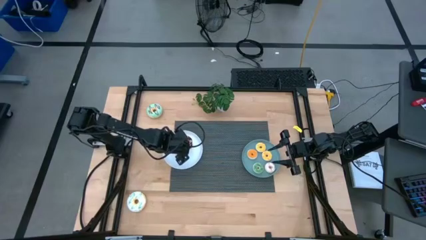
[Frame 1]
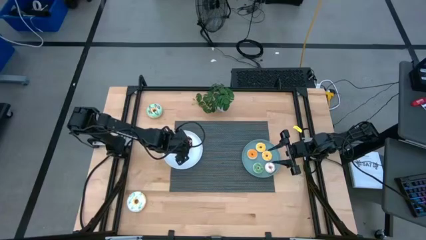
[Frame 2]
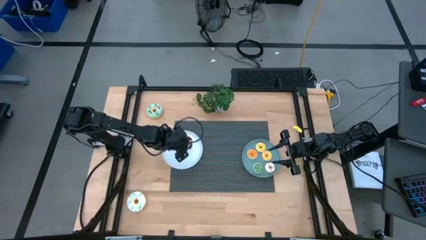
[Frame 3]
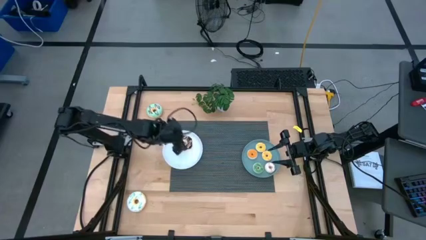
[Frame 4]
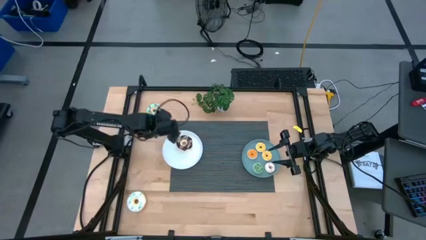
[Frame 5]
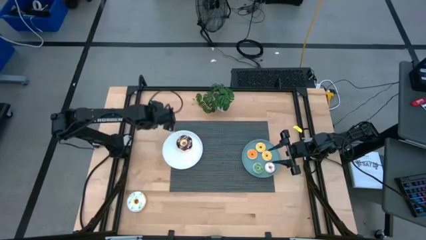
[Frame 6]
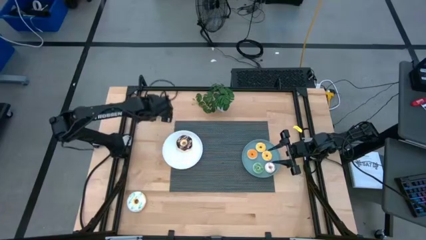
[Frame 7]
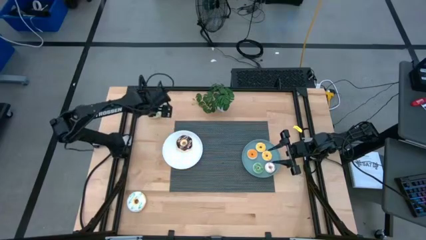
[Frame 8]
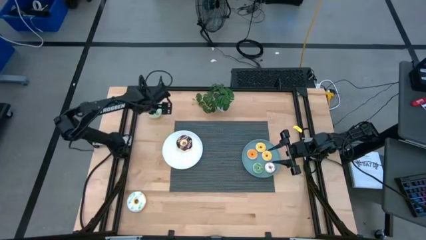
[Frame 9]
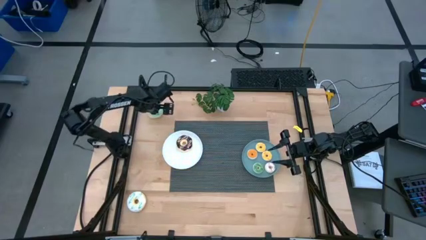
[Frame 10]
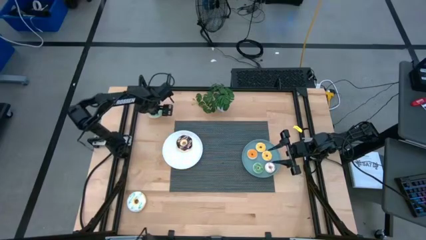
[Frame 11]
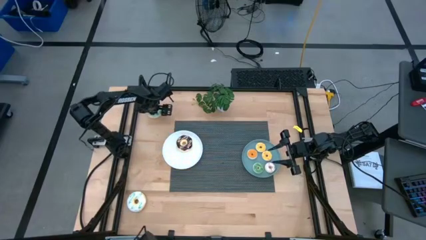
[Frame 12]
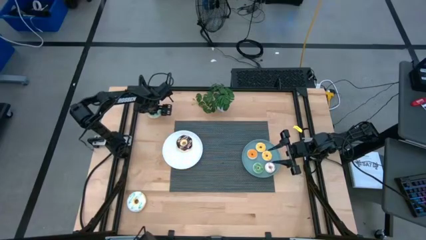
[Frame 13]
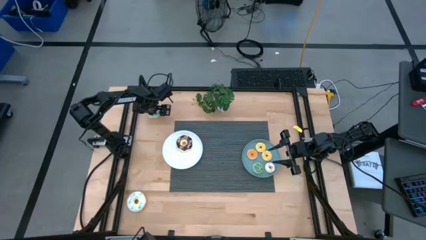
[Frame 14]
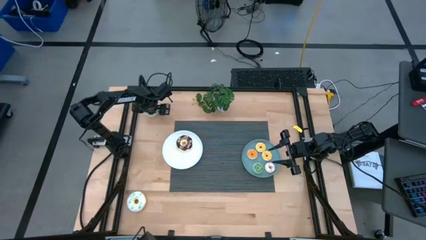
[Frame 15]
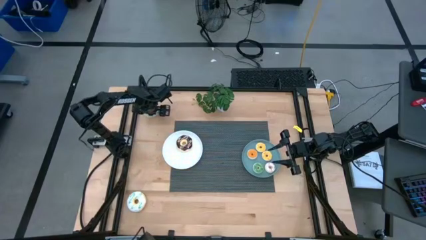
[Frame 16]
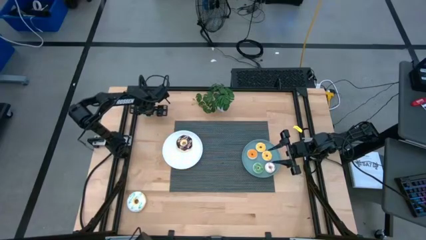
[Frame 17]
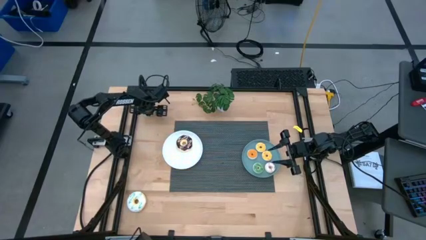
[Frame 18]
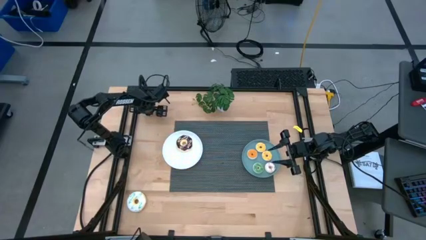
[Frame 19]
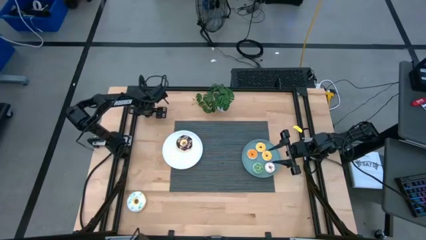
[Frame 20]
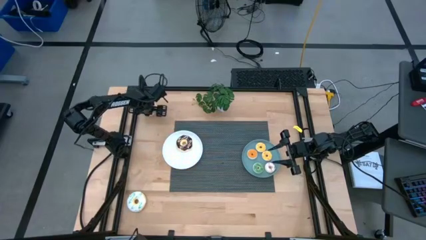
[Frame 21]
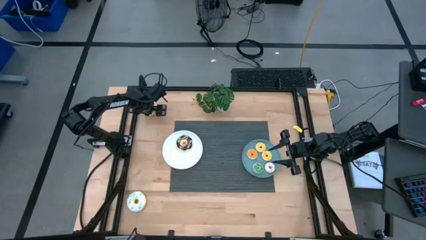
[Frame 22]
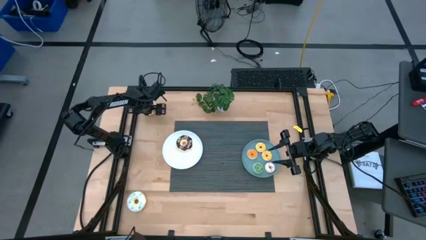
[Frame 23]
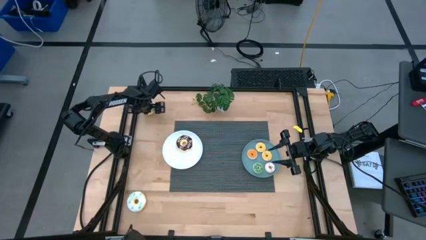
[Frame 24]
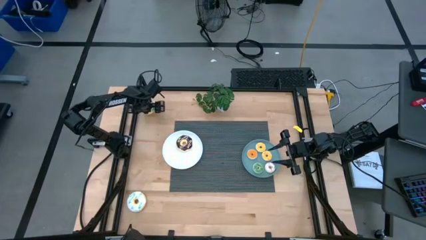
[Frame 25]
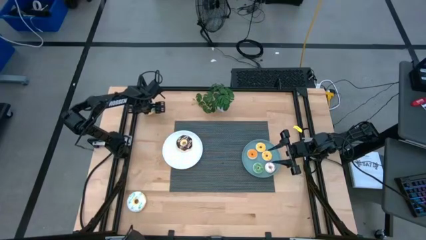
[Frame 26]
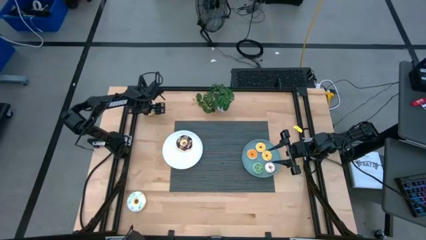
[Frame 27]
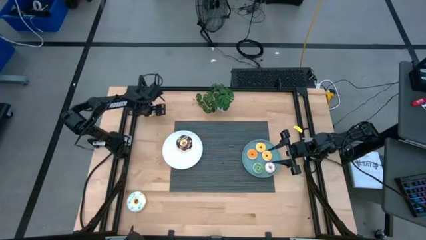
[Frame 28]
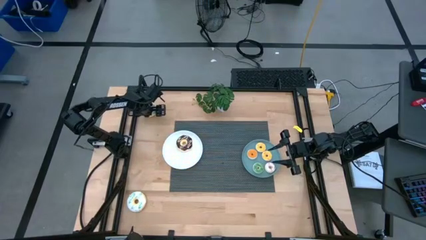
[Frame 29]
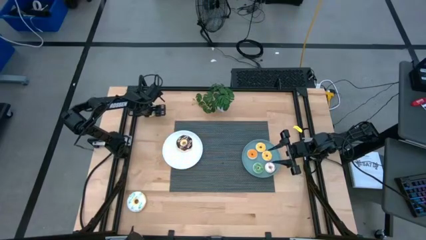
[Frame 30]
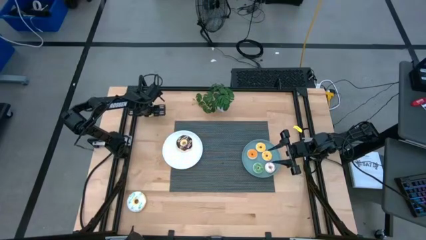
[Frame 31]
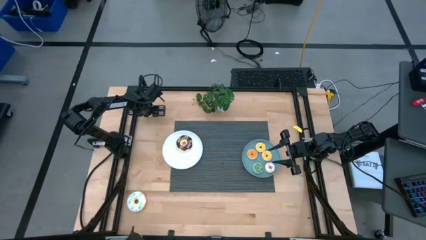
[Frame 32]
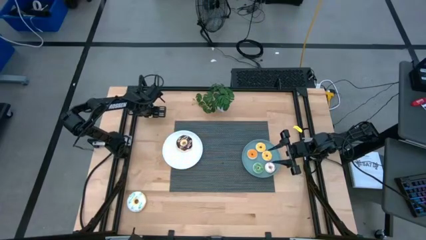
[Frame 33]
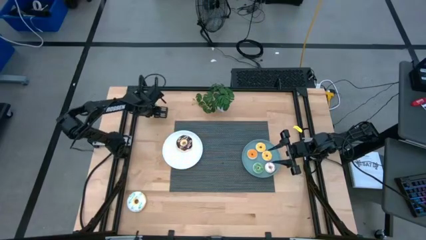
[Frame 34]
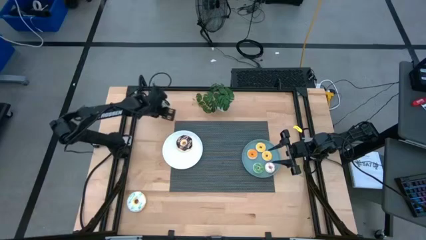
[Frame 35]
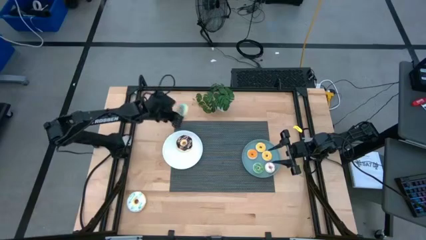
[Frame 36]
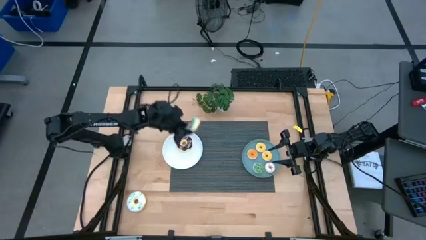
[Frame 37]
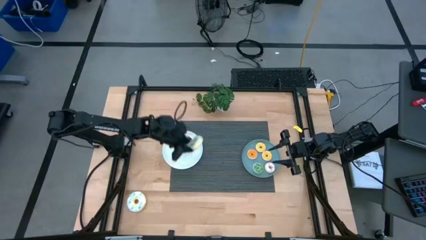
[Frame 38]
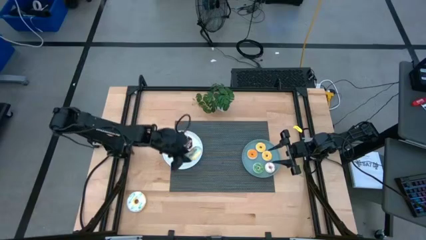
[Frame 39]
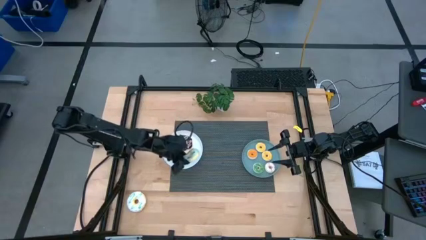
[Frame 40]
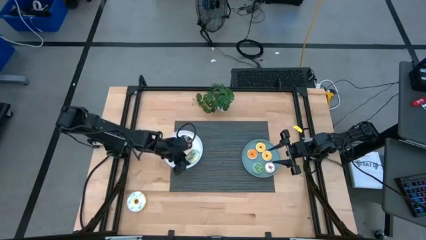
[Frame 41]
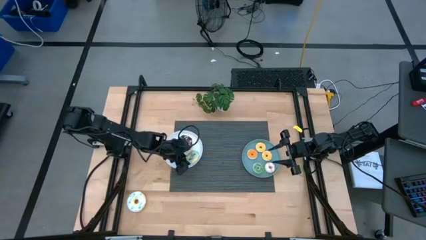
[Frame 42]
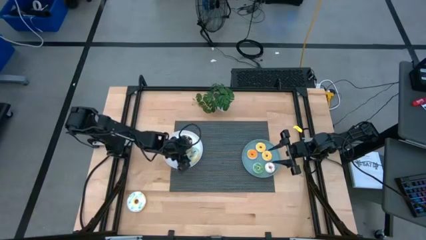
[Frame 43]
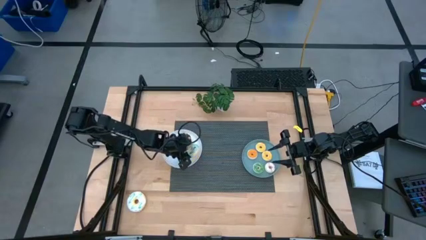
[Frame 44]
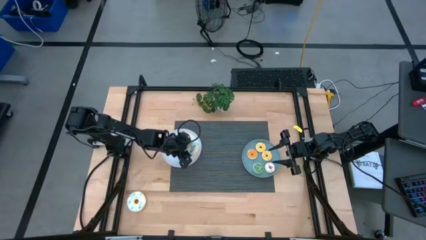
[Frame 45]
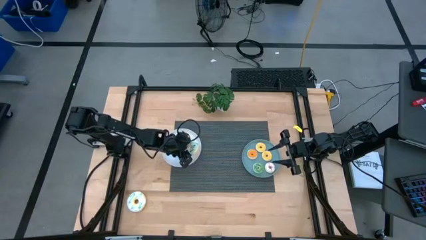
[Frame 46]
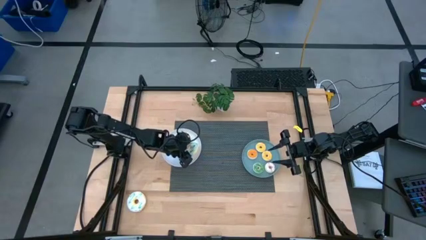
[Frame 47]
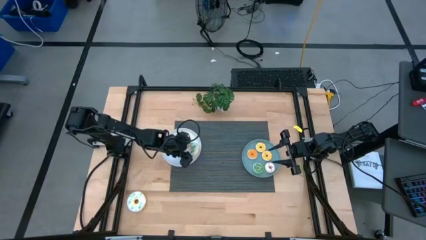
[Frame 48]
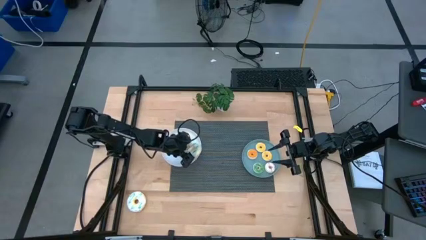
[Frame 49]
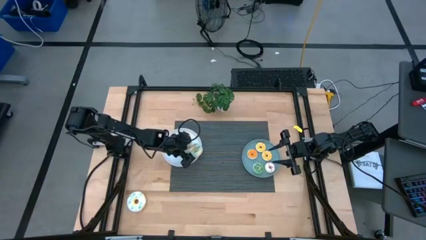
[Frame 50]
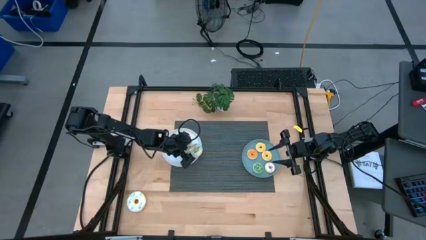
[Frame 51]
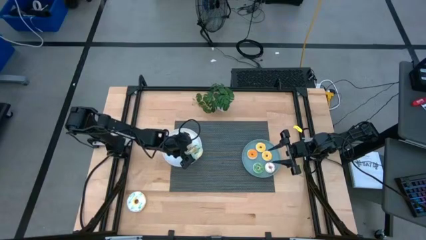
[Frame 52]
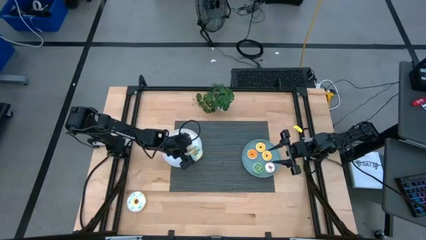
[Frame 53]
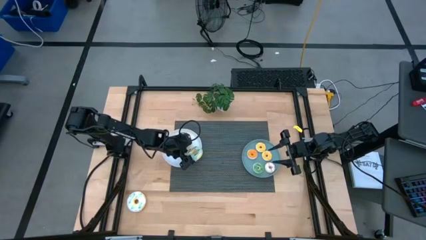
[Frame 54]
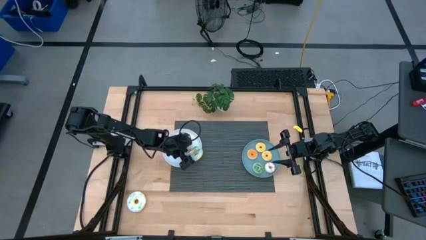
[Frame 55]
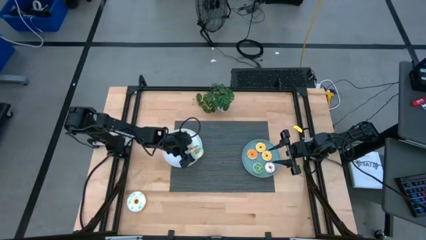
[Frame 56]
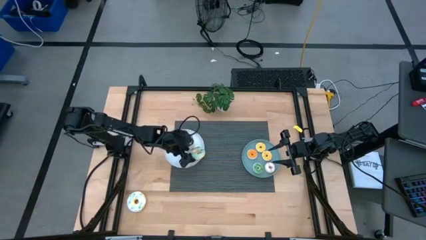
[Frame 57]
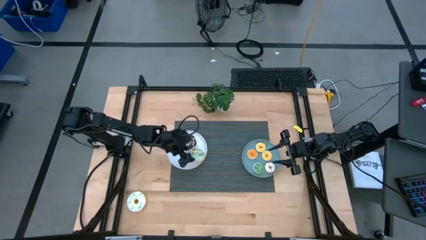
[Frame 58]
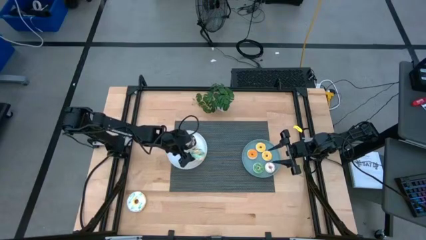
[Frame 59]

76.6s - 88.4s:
Task: Pick & Place donuts
Put the large blue doughnut on top of the white plate

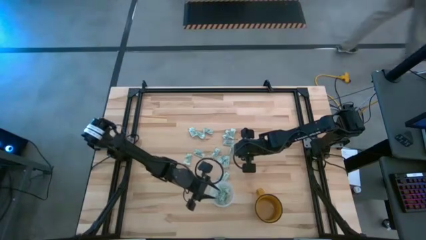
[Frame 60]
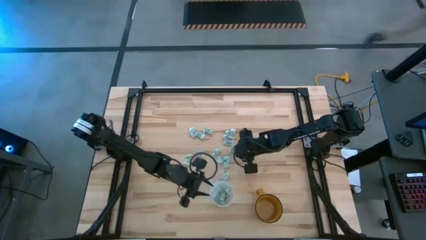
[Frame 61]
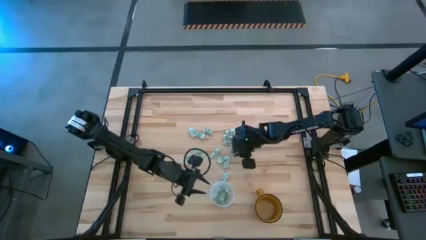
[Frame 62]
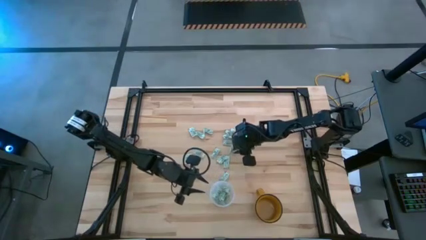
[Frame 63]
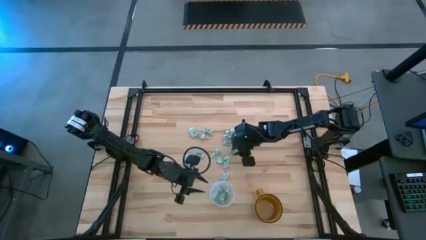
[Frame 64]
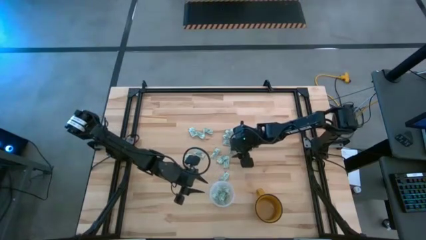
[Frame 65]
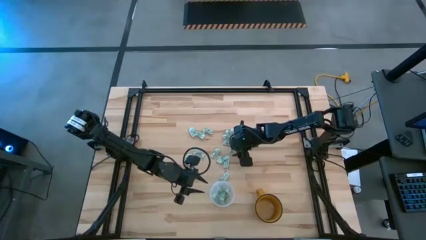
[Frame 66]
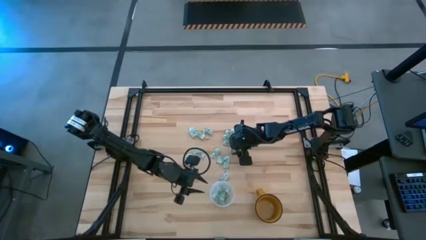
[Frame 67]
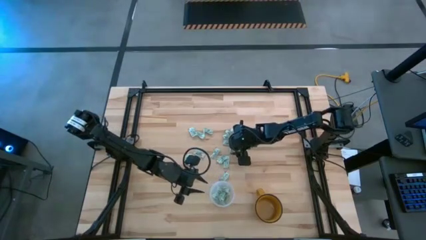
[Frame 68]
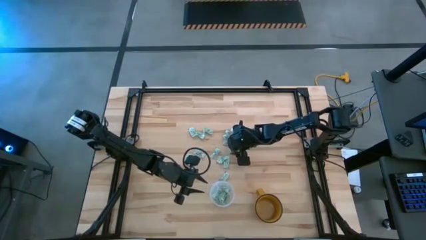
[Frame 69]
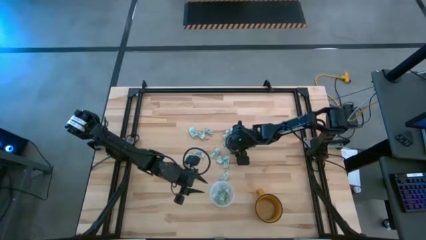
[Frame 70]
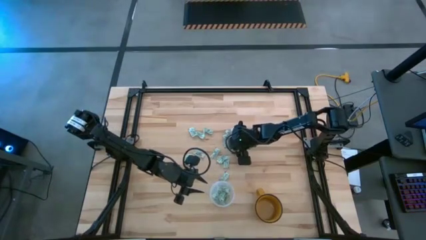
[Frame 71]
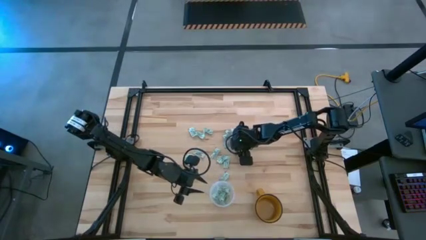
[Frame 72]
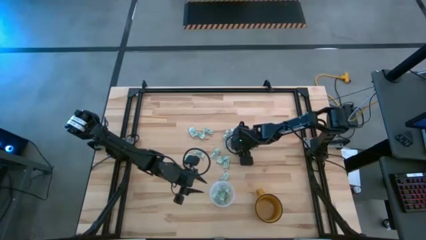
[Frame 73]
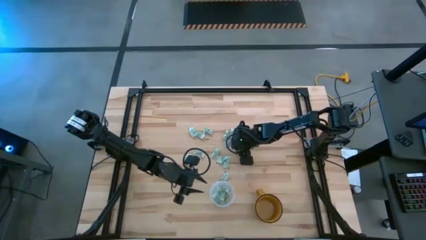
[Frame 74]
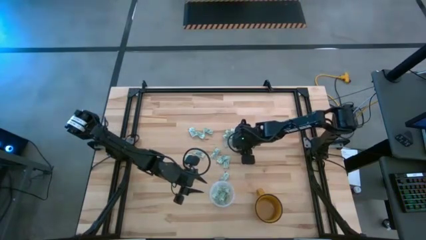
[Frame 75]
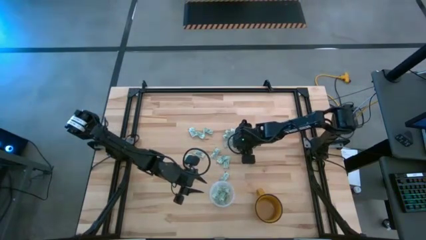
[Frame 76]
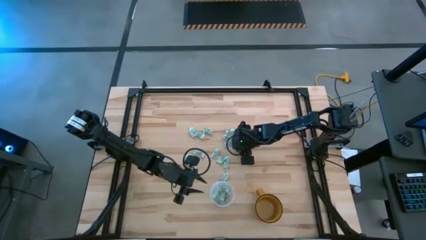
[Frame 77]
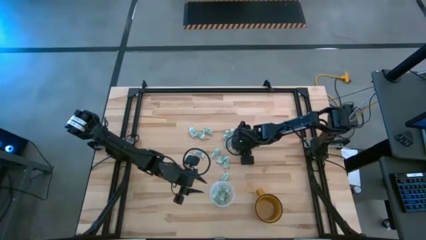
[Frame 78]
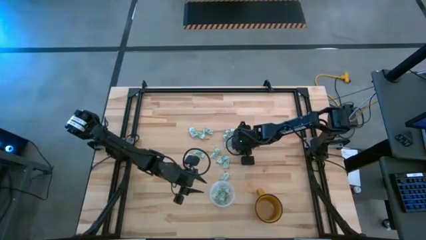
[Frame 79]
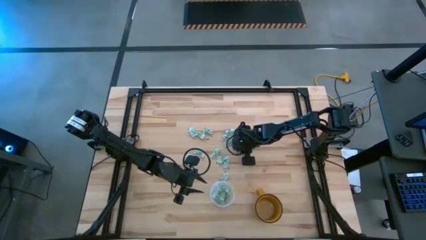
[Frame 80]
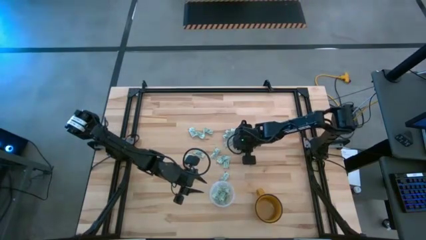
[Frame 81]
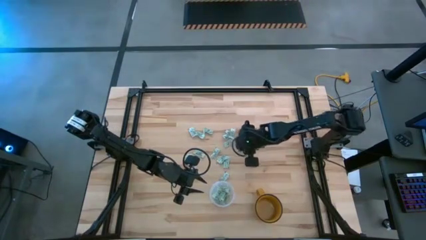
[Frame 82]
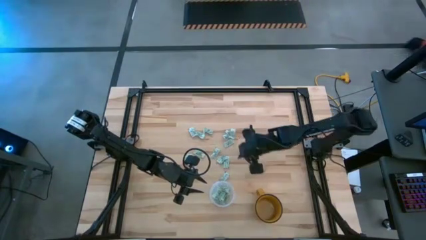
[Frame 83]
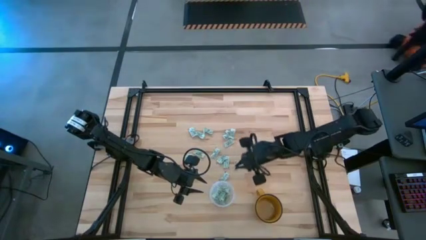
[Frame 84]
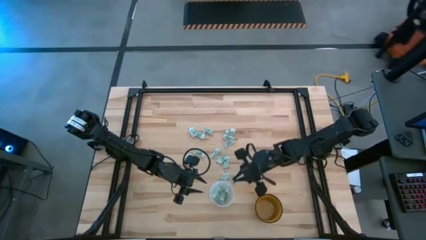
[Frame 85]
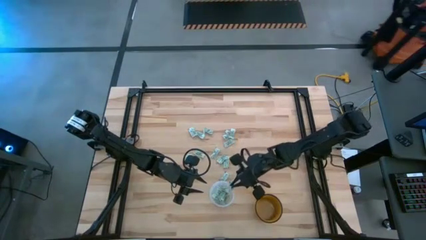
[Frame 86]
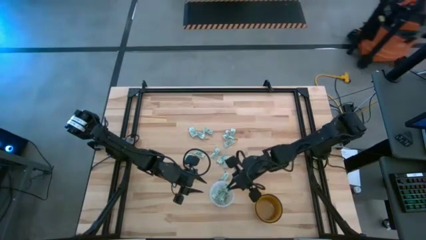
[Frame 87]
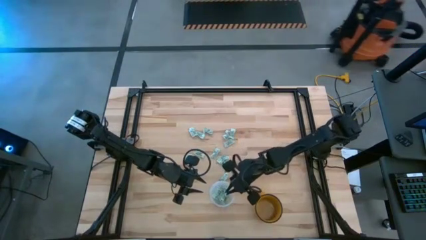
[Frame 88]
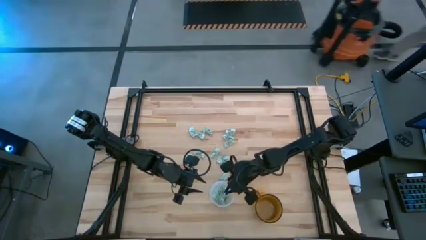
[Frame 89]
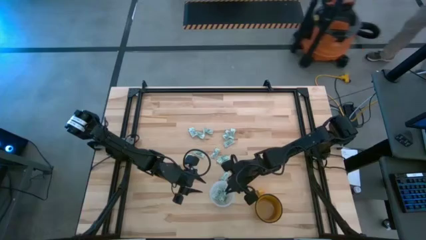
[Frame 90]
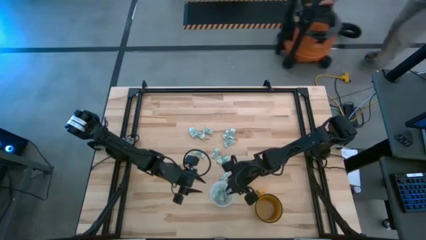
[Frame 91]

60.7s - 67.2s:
Task: Pick and place Stevia / Truvia into bins
Put the stevia packet into the transparent bin
